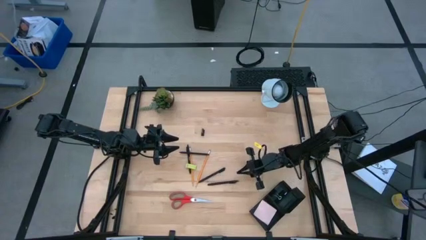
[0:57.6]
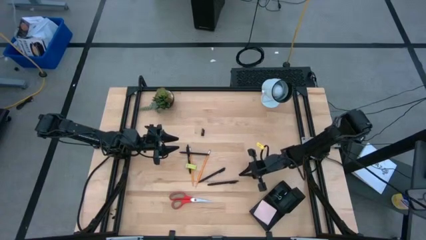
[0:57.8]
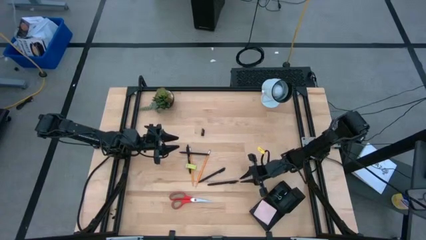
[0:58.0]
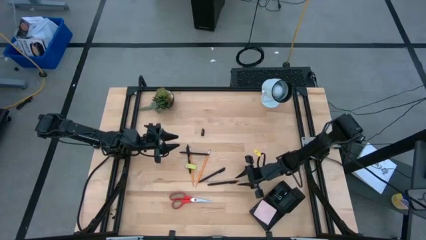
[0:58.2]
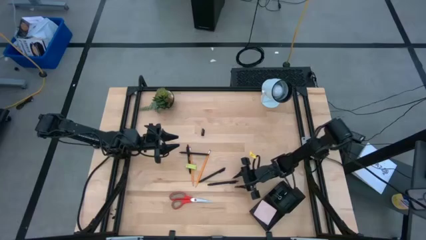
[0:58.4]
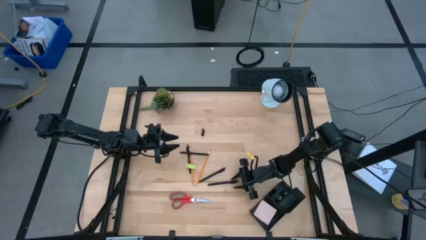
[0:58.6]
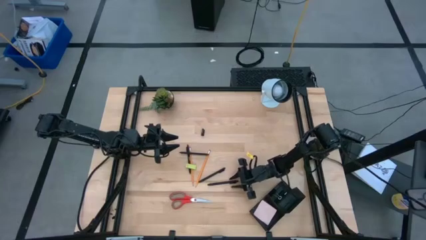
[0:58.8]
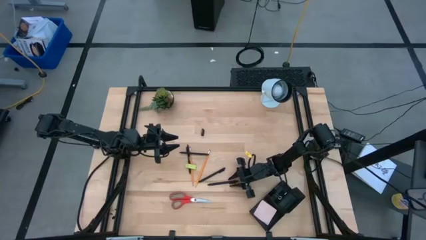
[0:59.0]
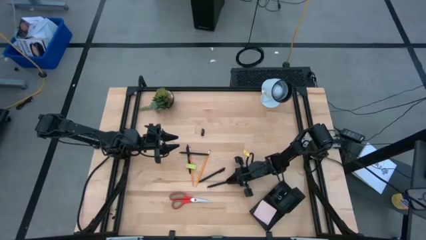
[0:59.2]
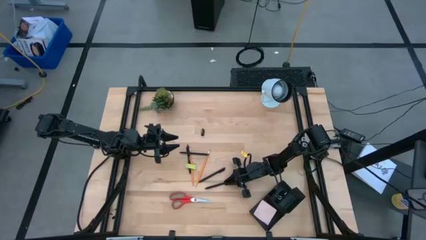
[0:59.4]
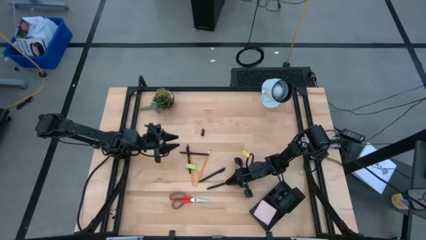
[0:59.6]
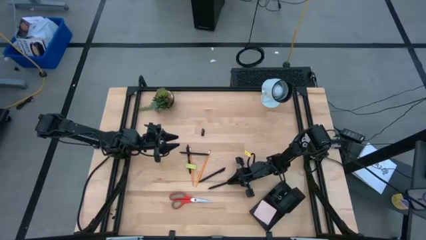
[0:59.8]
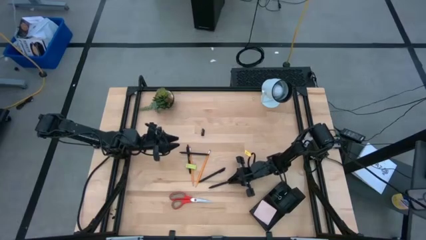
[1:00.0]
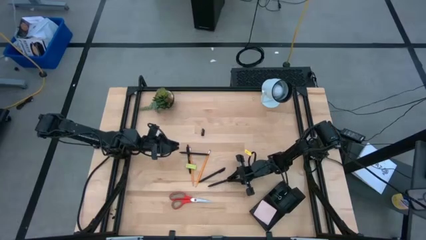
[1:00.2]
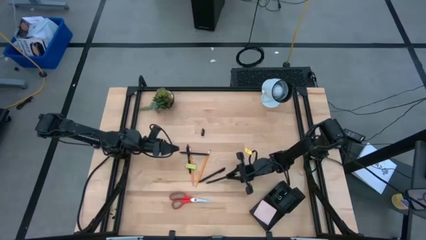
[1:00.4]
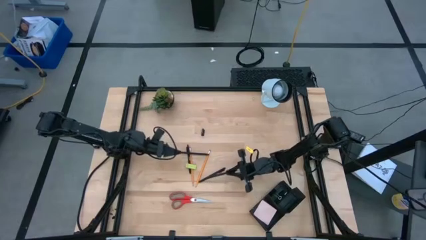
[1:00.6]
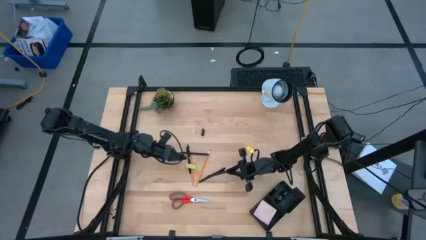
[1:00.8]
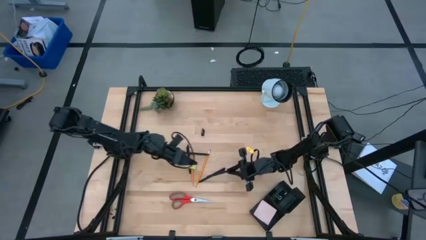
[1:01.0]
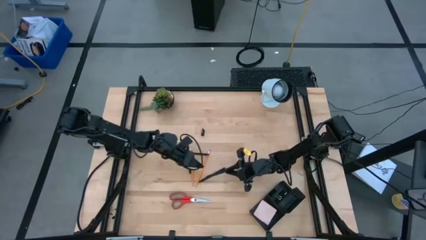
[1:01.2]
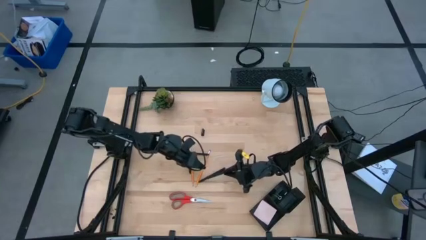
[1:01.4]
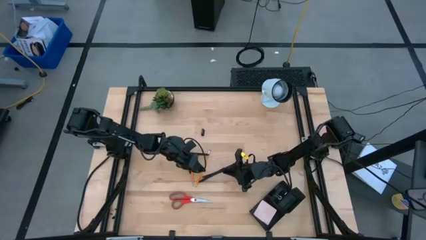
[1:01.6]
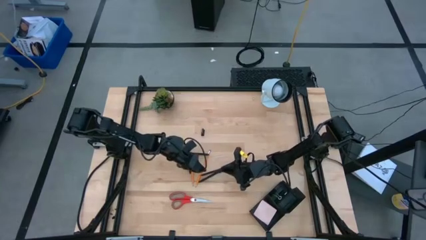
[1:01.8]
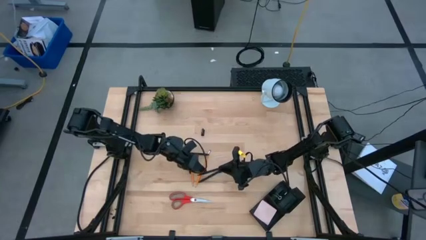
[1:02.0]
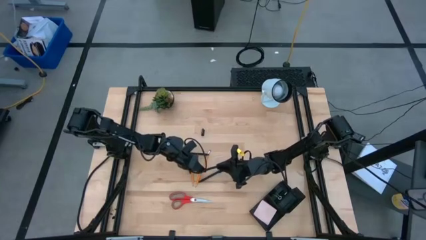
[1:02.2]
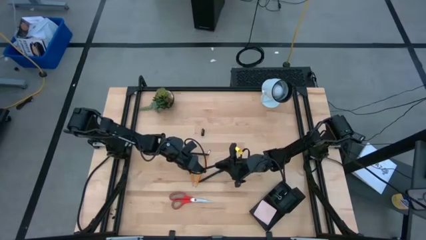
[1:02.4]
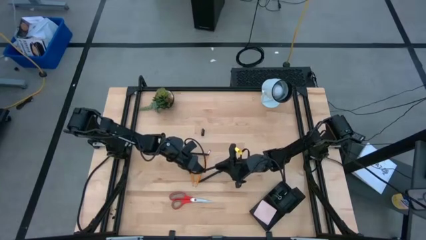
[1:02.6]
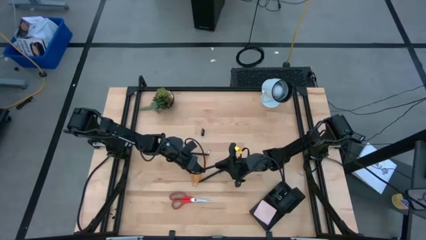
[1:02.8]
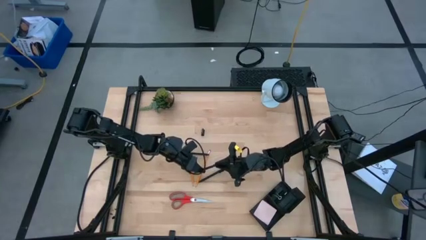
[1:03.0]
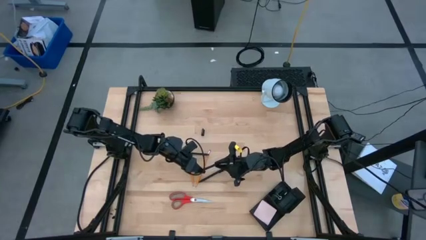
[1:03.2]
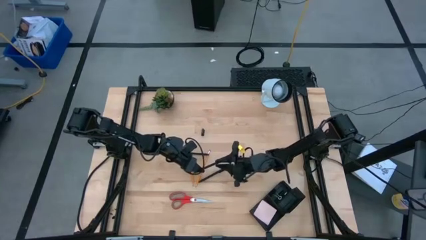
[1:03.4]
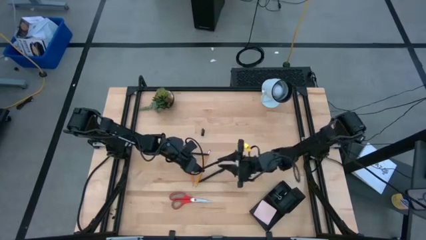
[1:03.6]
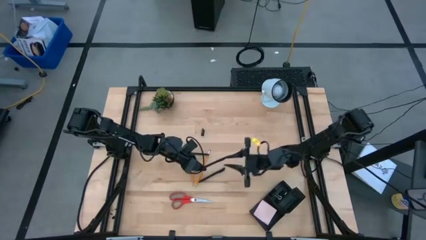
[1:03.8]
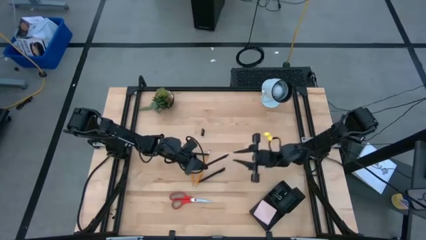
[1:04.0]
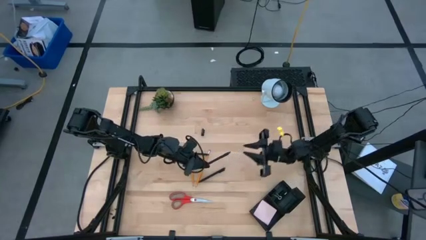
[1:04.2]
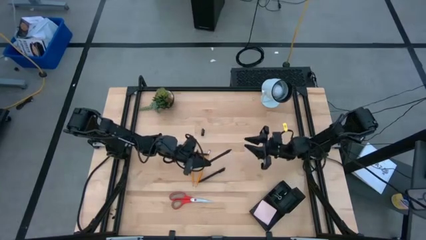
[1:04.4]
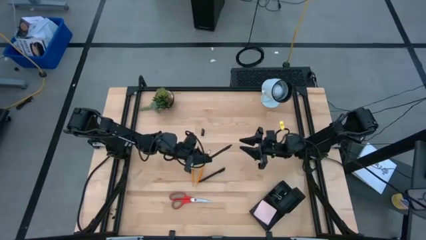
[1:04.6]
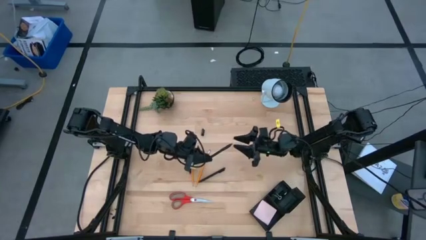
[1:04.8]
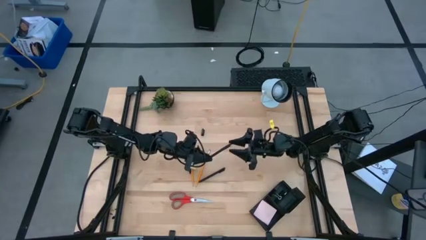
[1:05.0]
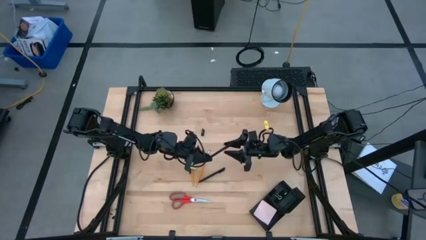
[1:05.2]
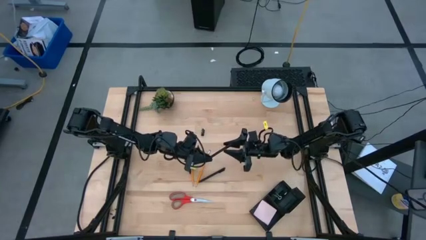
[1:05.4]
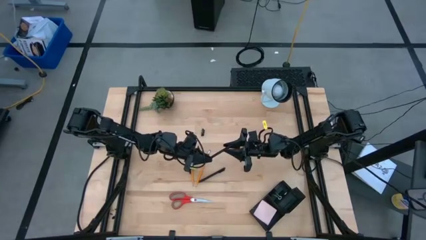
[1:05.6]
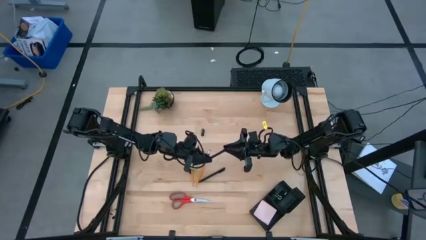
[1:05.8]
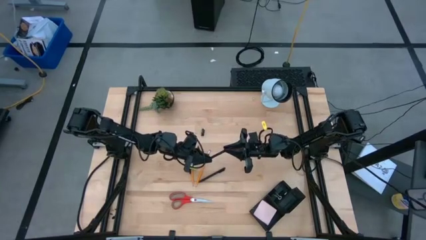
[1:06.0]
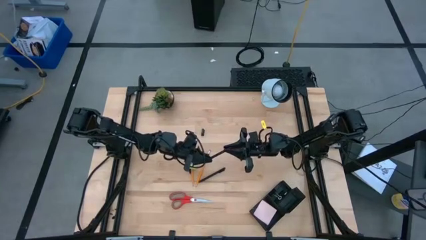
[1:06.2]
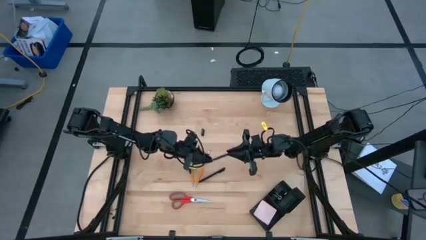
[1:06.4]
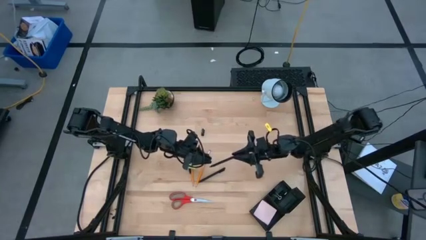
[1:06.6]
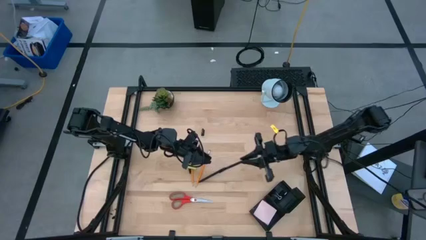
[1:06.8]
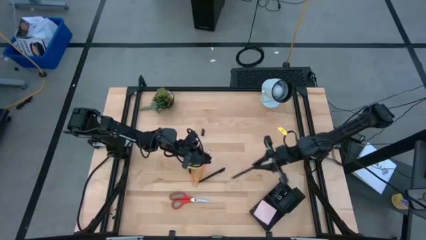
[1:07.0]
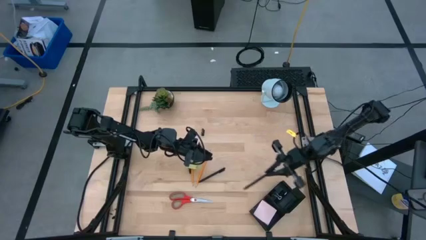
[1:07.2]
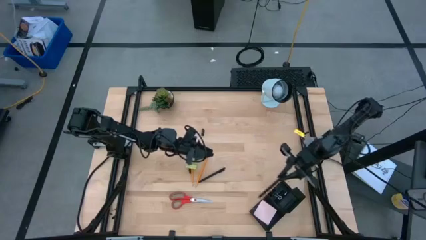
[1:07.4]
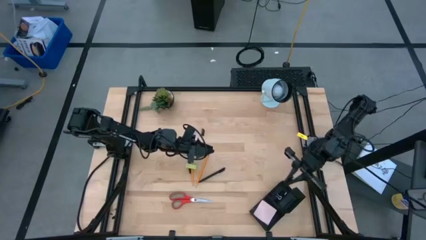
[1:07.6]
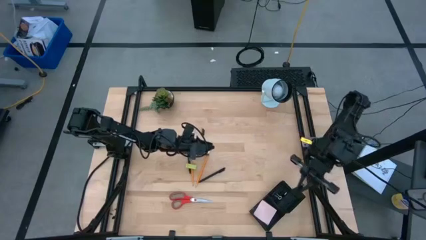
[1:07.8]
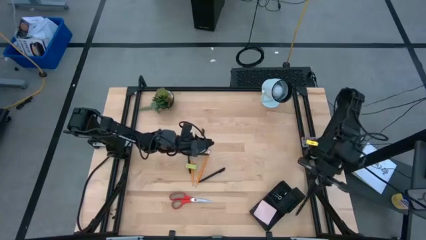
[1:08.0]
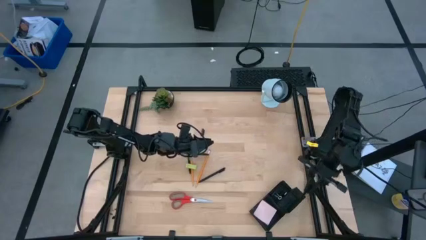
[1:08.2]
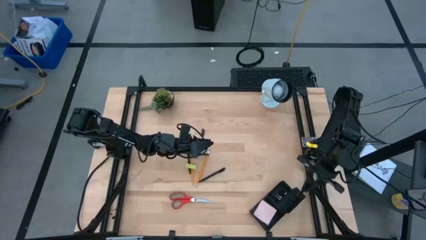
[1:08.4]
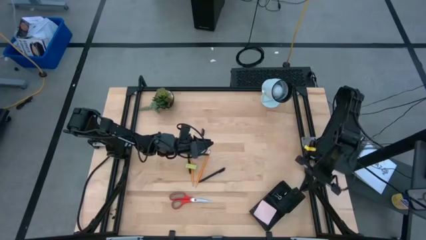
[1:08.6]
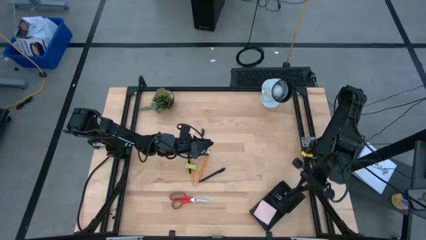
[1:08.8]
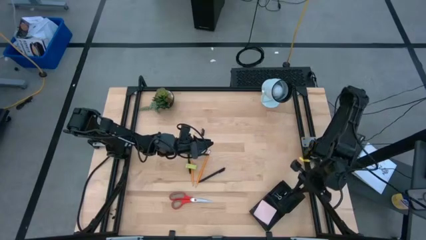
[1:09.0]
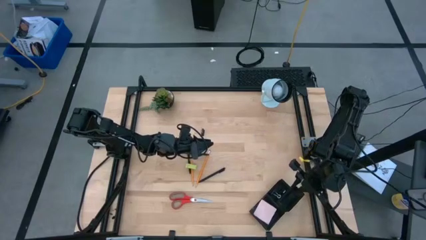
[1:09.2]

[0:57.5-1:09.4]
Task: Pick and place office supplies into organizer
Put the black pen into the desk organizer

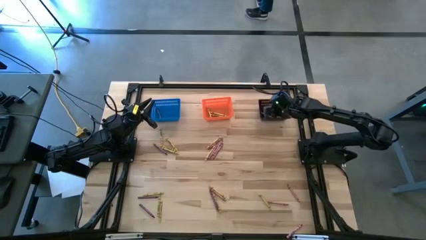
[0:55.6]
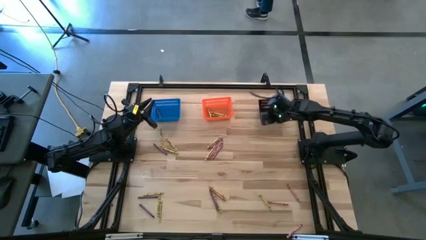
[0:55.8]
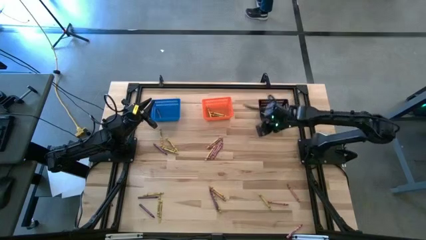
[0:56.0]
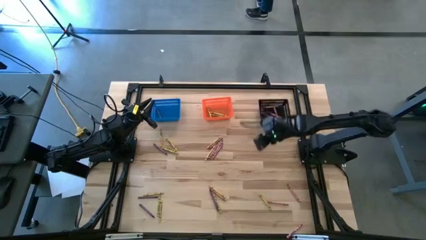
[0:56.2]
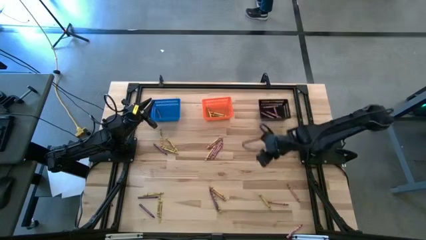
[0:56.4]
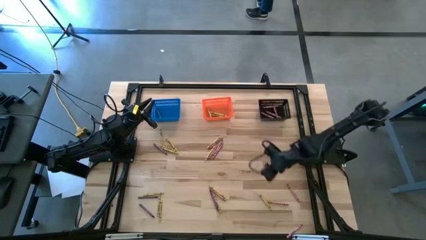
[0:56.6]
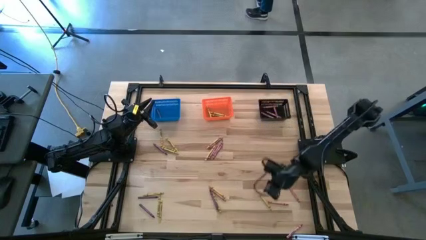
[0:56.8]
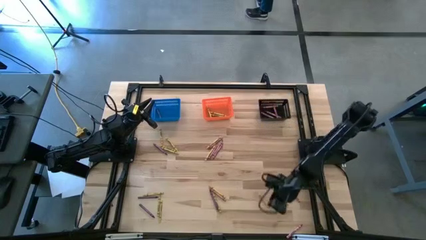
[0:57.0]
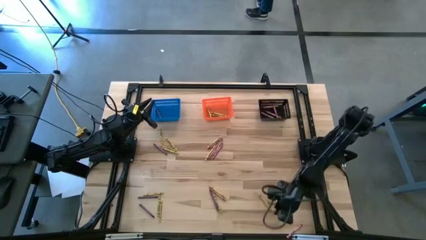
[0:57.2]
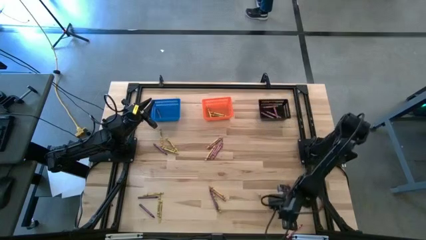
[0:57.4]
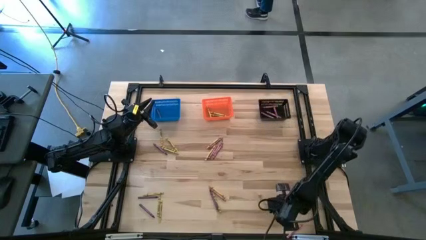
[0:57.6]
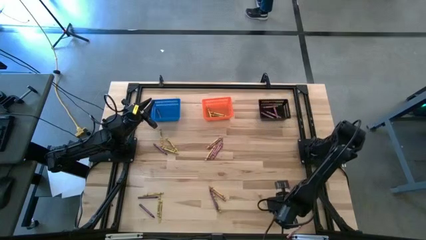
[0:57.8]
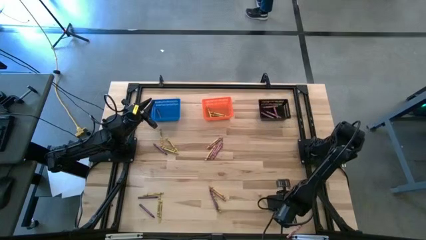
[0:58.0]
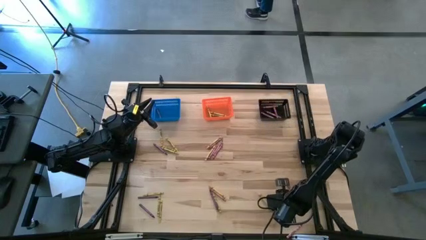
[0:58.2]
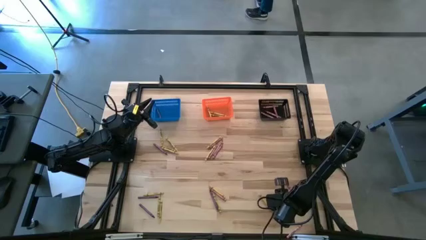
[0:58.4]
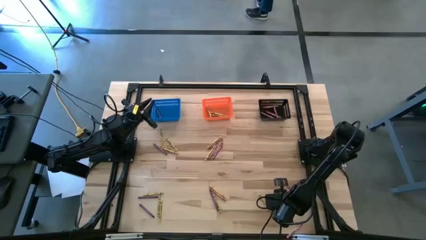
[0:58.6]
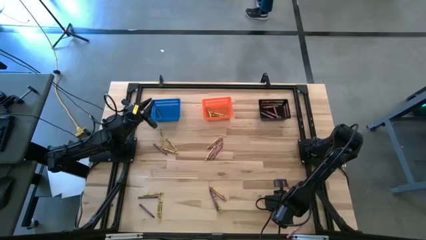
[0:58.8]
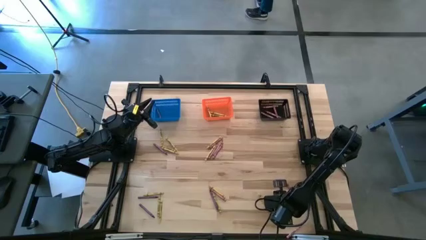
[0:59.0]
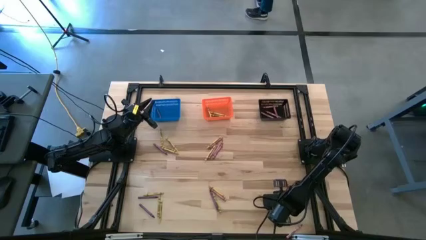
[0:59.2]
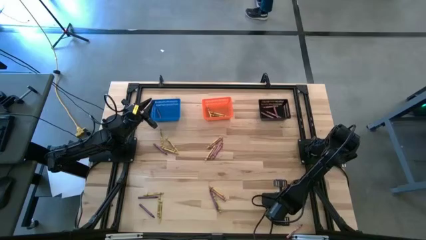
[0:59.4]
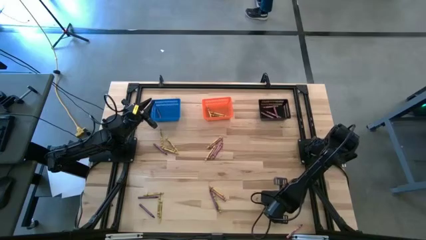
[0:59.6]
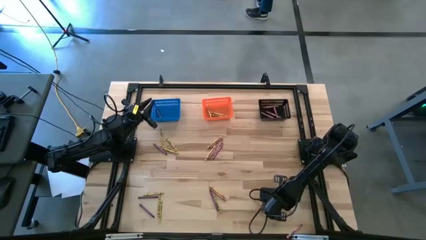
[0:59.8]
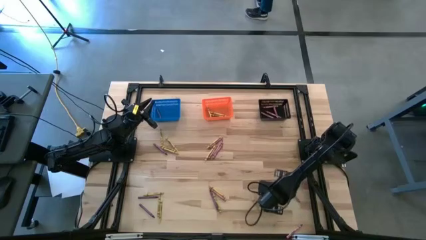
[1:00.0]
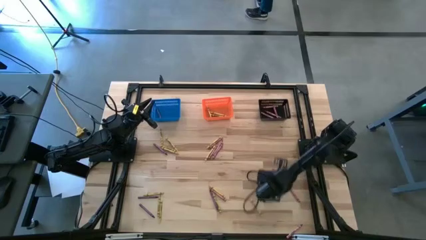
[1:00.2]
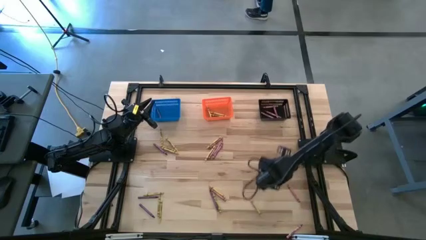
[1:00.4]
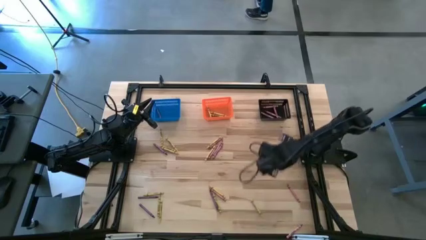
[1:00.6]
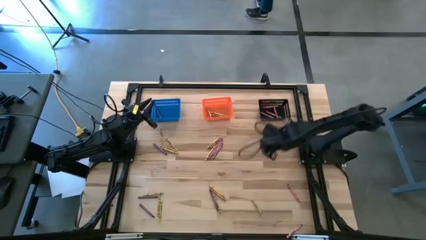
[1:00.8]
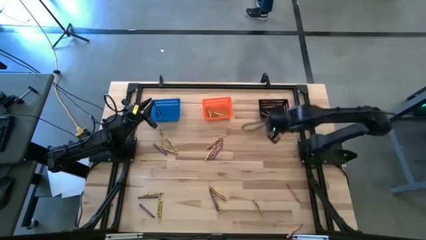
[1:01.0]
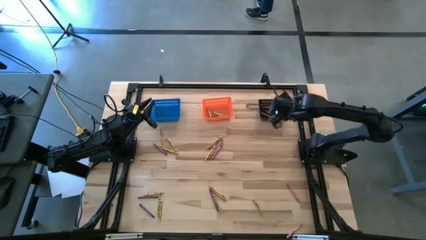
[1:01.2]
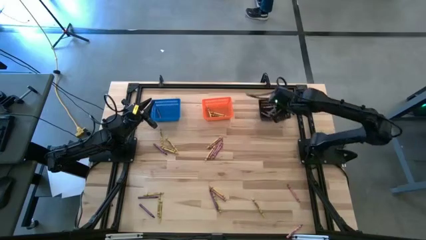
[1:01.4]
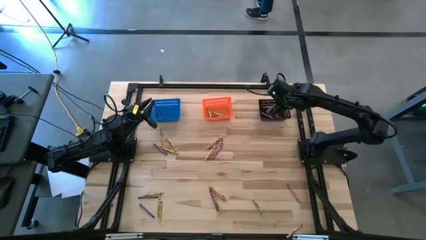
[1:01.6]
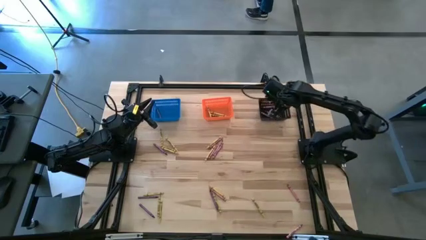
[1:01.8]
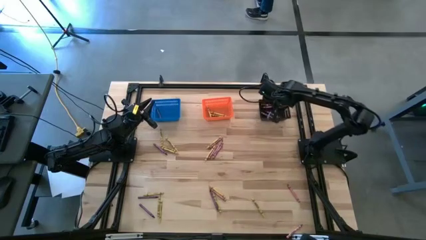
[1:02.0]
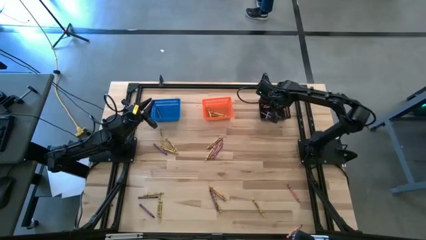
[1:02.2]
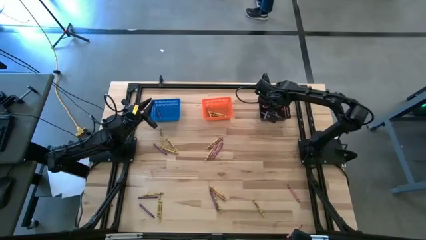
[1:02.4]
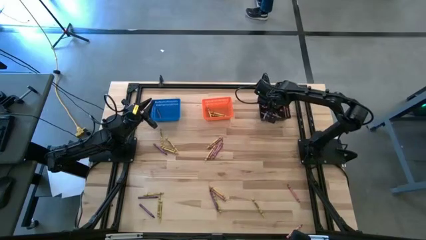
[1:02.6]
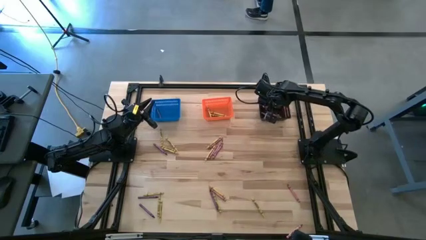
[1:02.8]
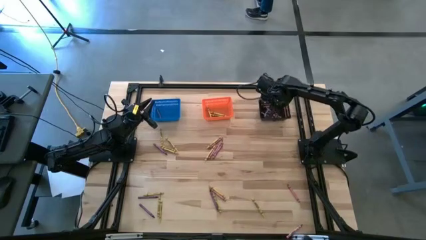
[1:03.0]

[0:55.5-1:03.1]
Task: Sort crayons
Put the red crayon into the black bin
